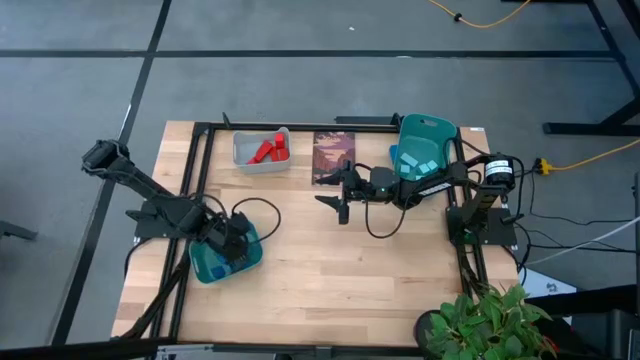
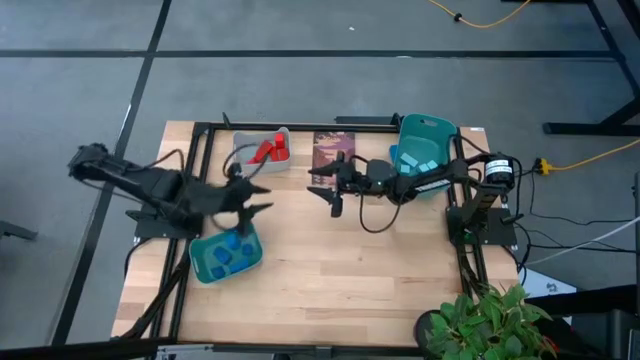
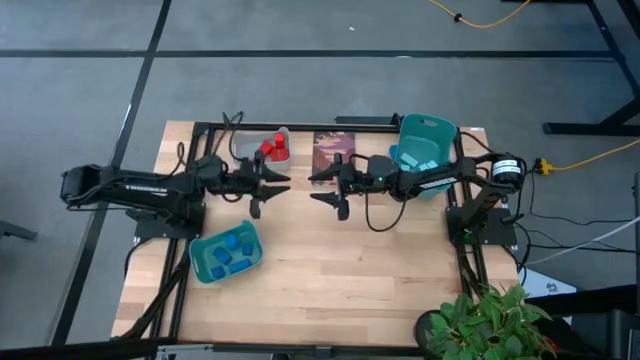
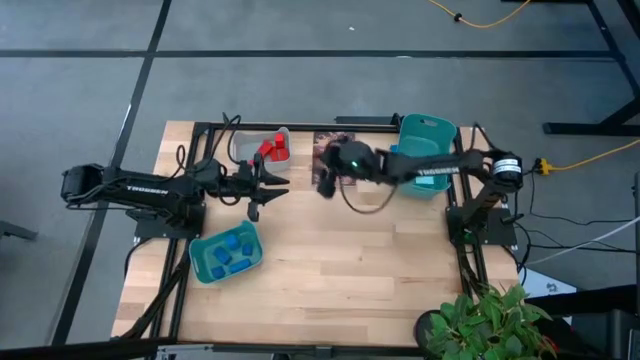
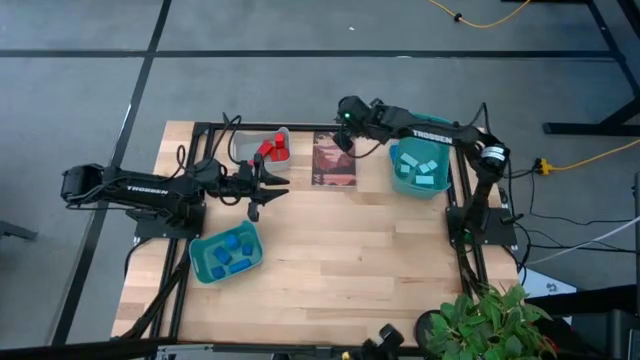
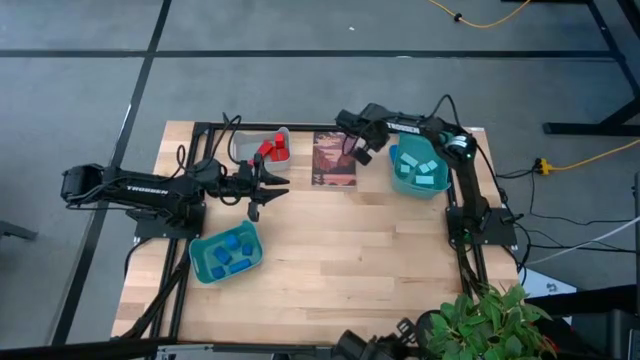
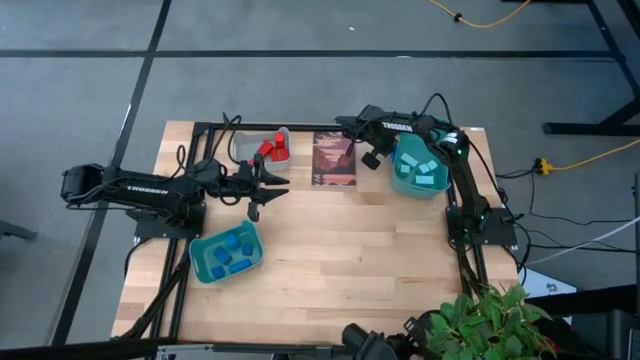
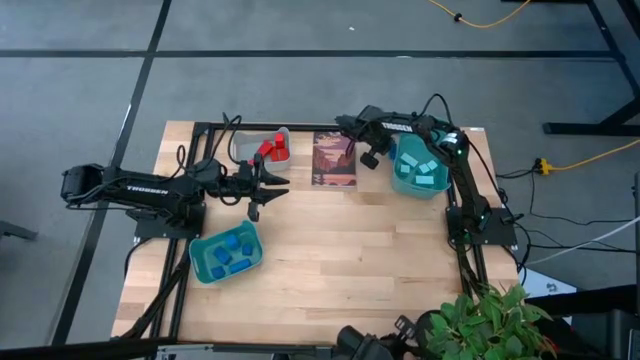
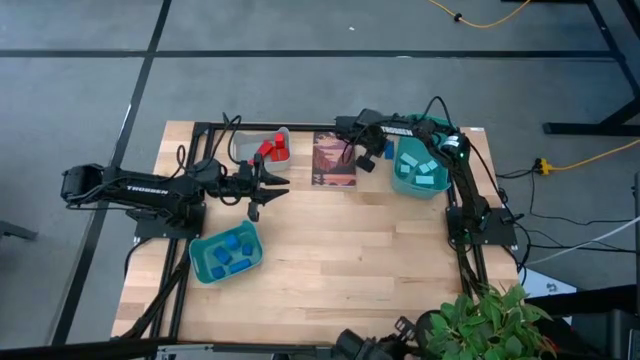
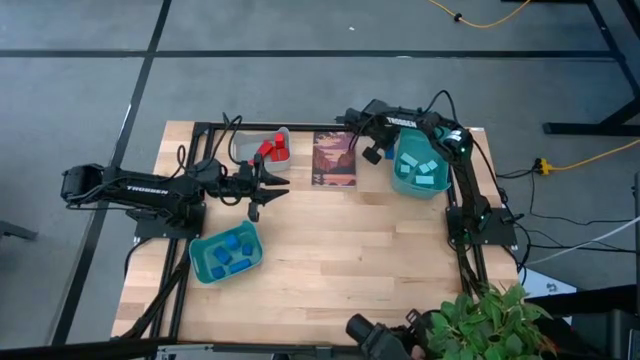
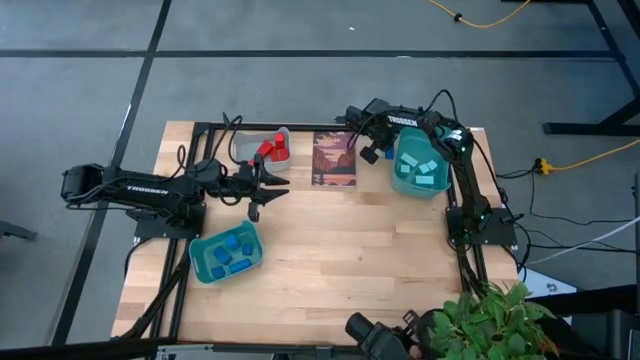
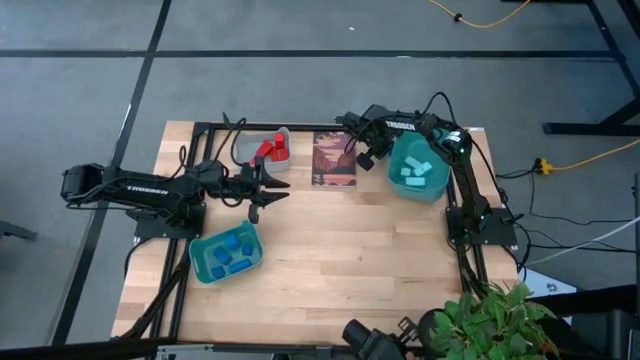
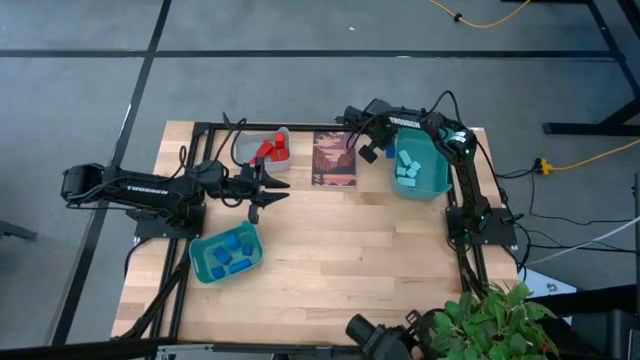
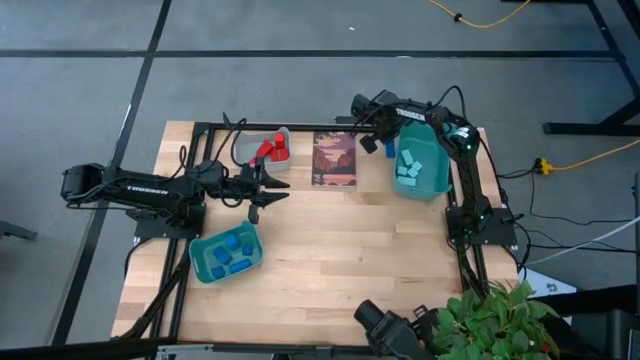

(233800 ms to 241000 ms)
Task: Sort & place blocks by color
Put the blue block into the left green bin

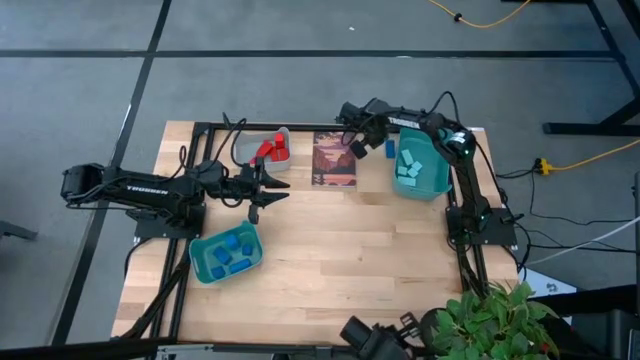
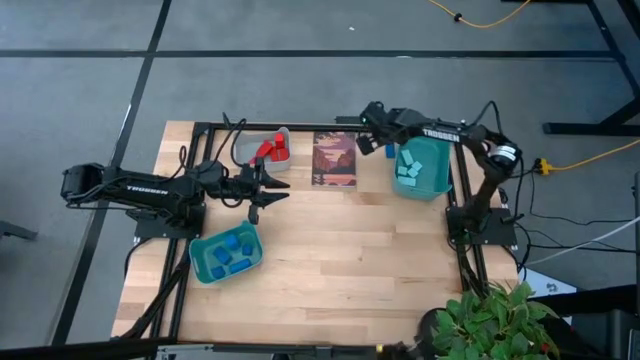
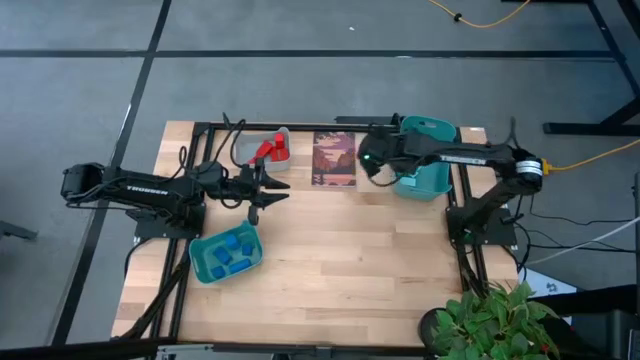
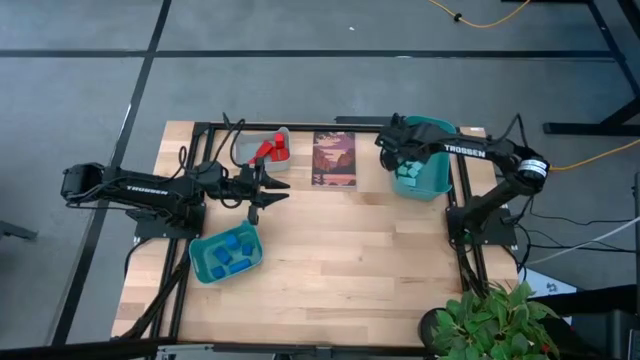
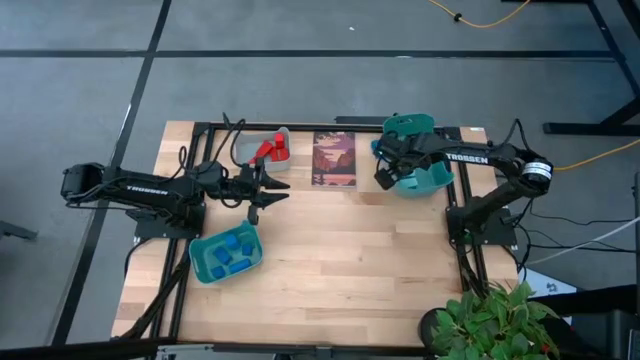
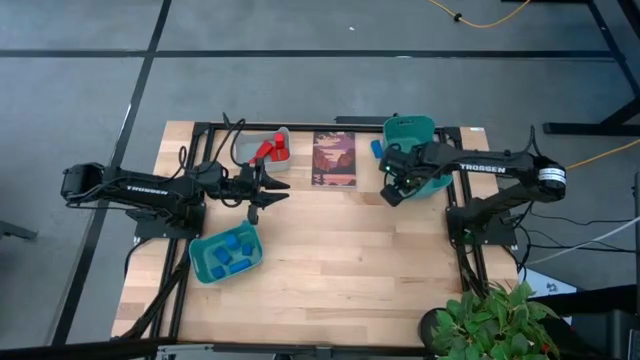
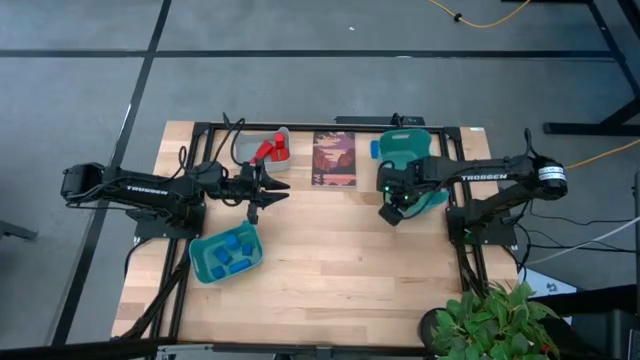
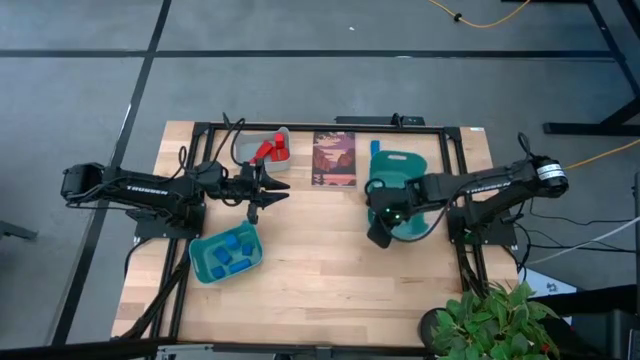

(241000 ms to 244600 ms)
Move the right green bin to the bottom

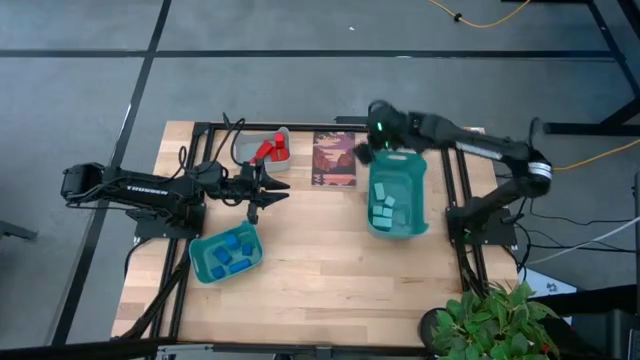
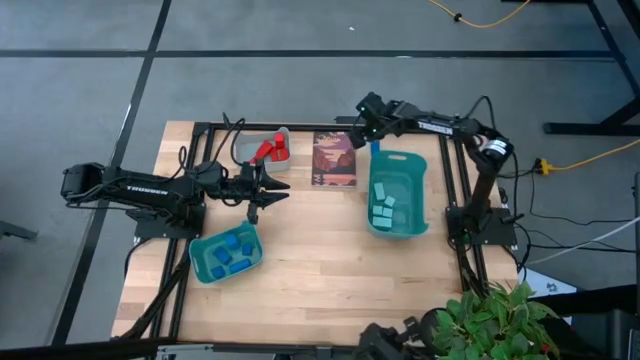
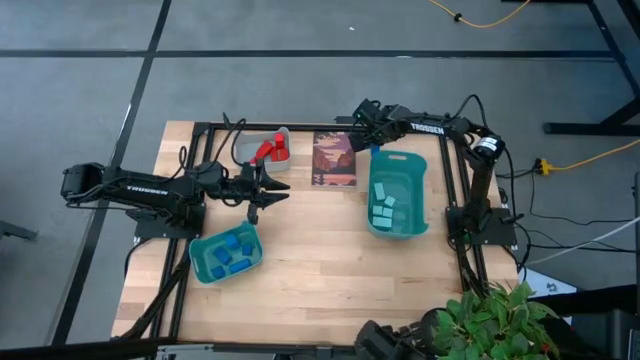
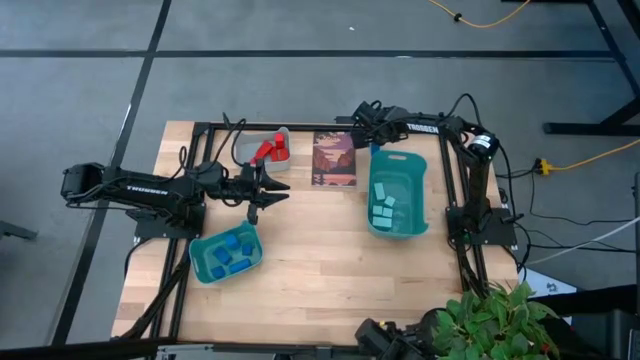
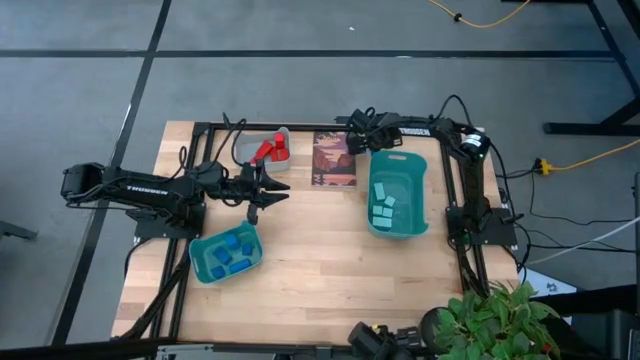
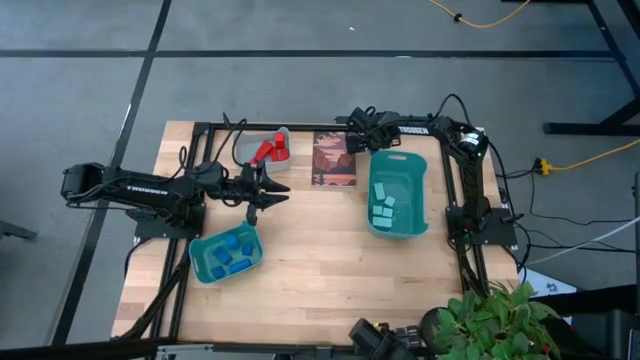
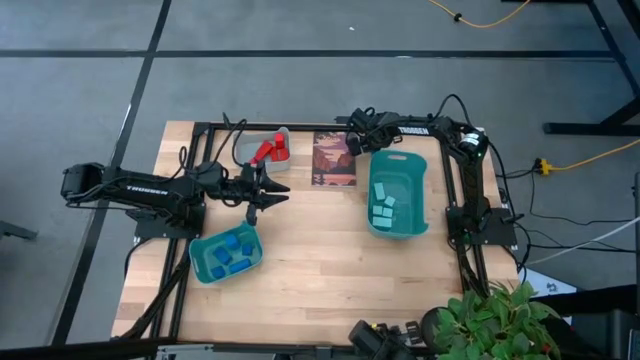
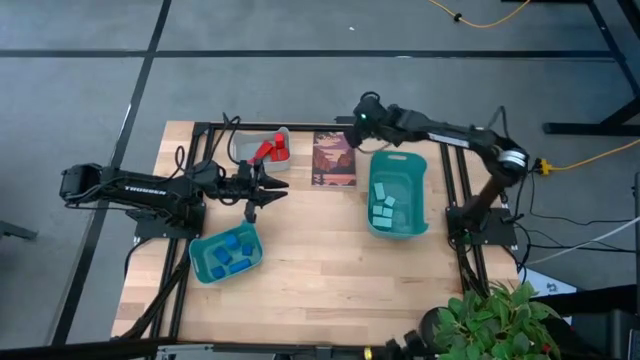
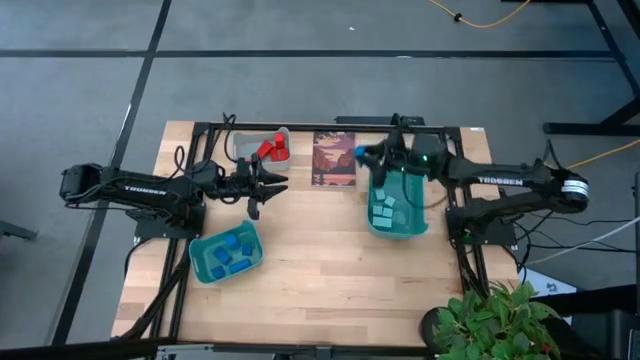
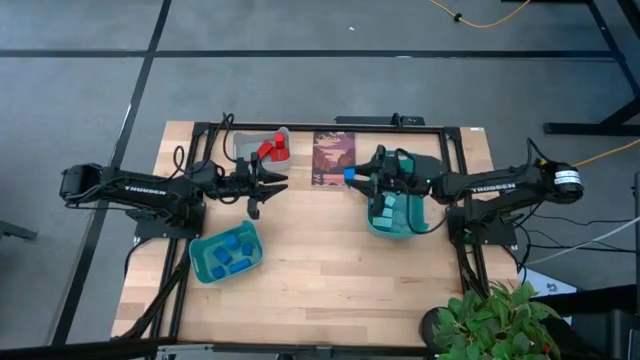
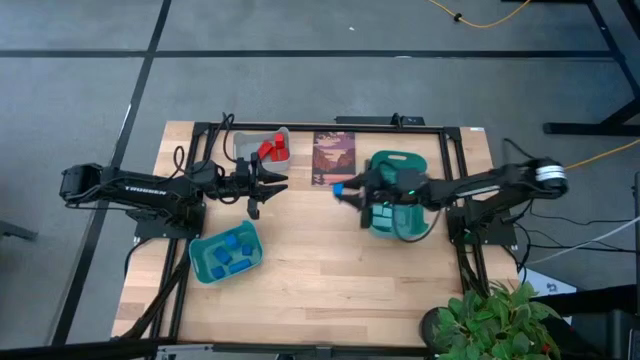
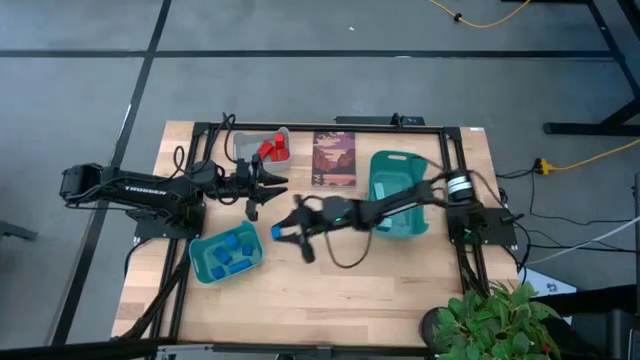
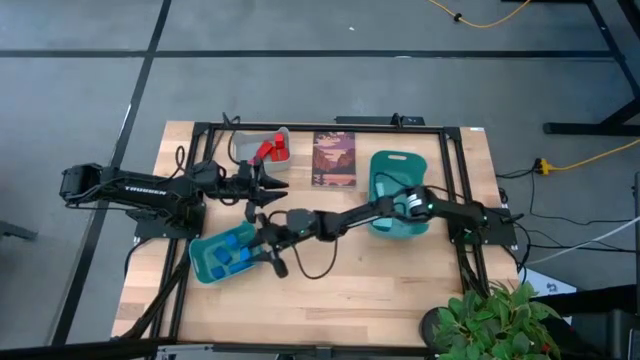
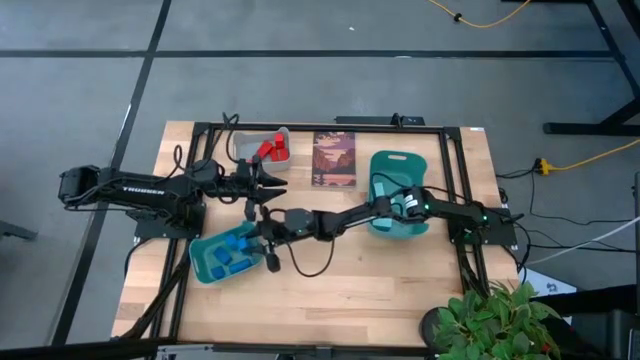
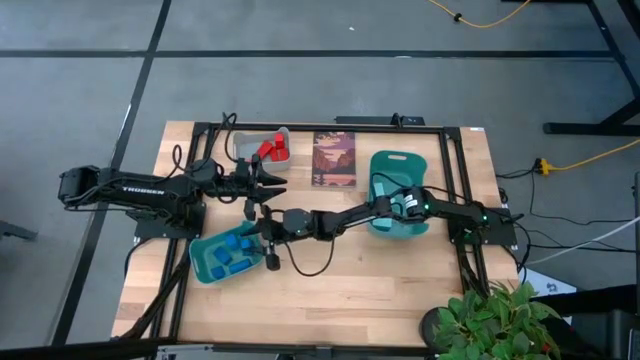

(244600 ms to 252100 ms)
Put the blue block into the left green bin

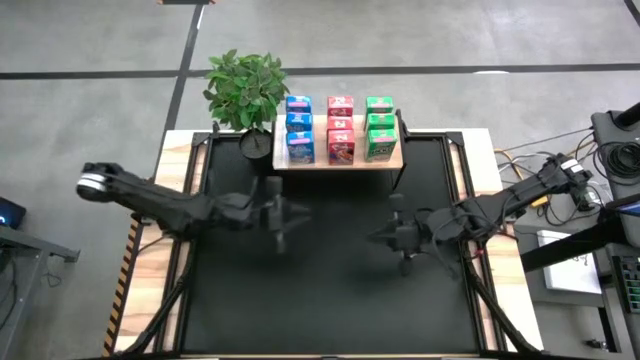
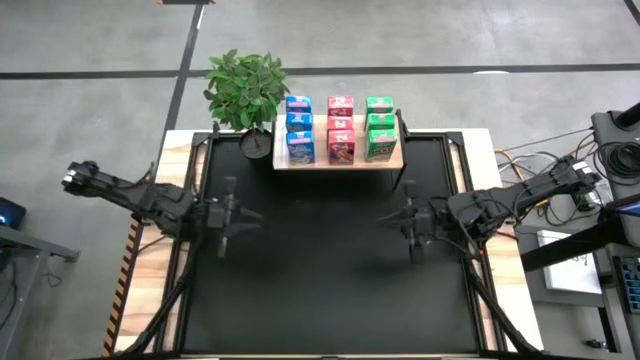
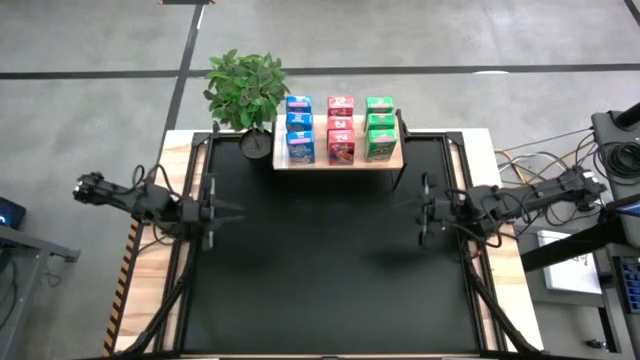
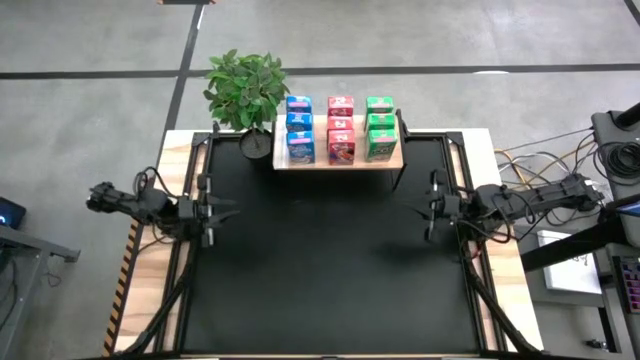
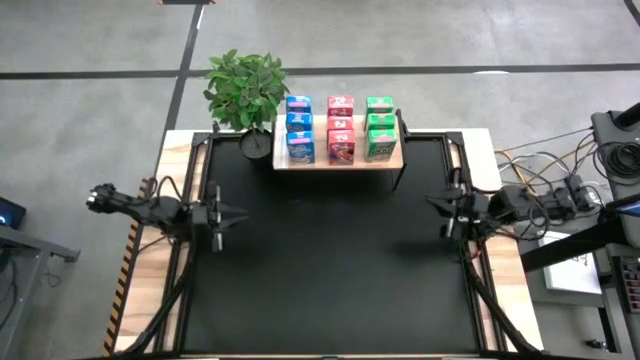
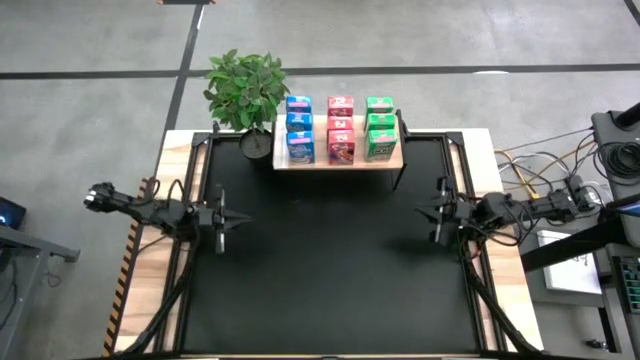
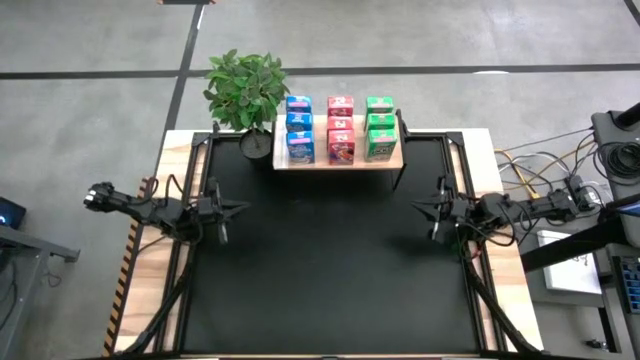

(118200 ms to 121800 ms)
Task: Stack cereal on shelf
Return to Home Position
